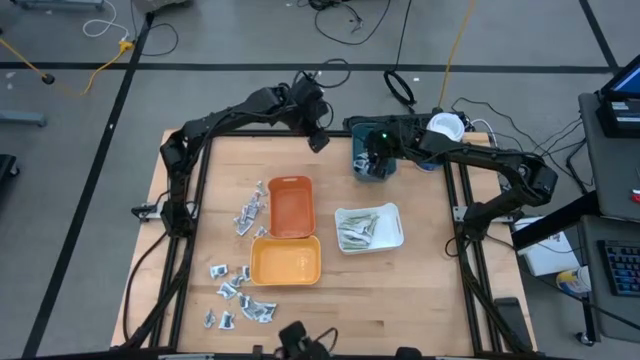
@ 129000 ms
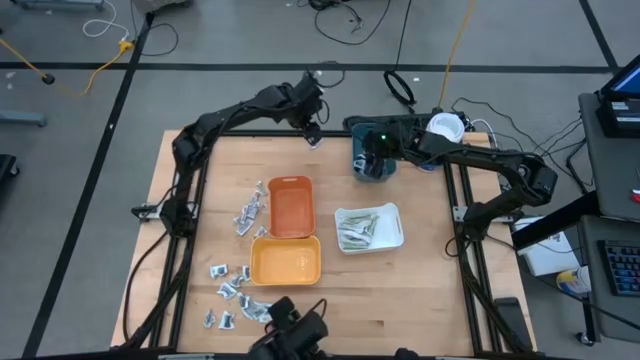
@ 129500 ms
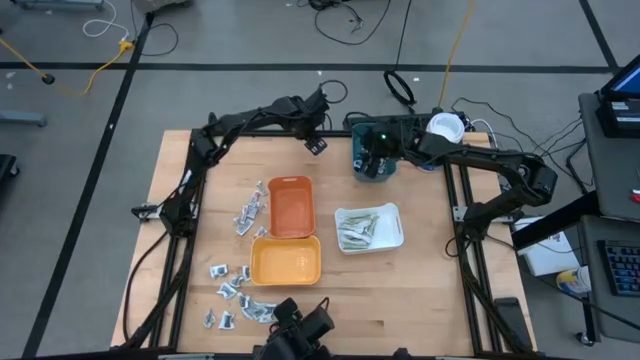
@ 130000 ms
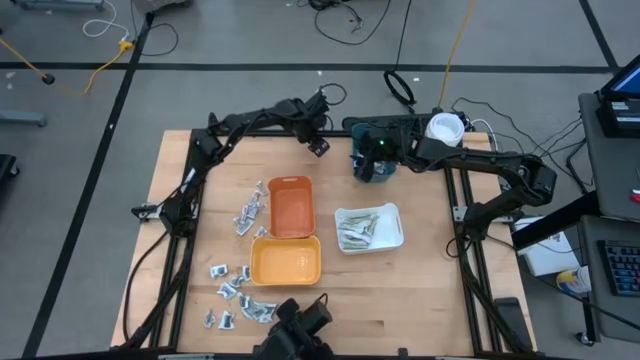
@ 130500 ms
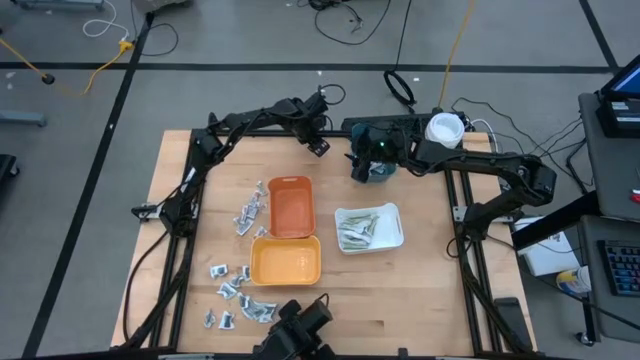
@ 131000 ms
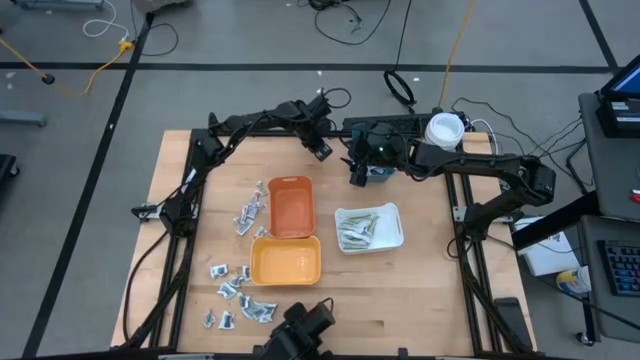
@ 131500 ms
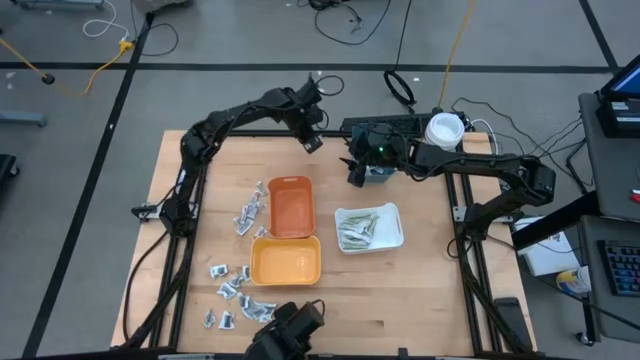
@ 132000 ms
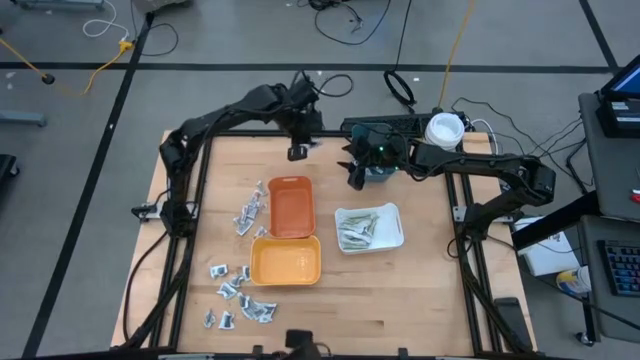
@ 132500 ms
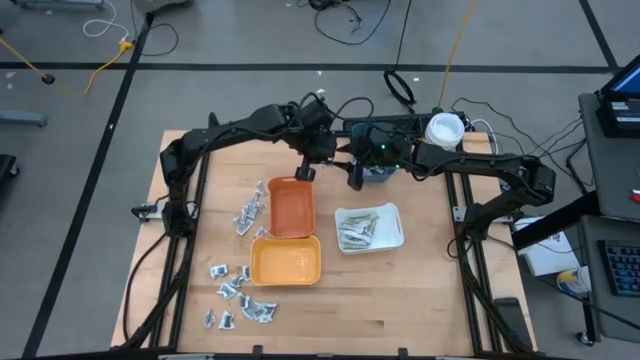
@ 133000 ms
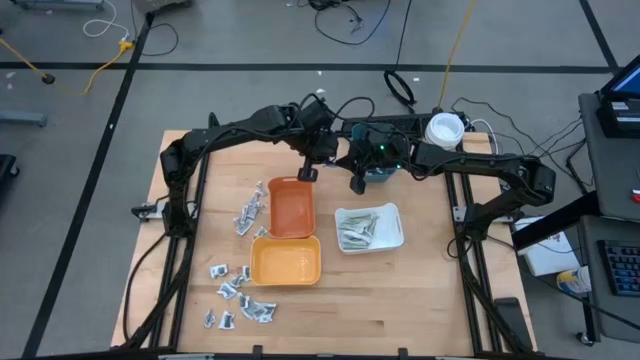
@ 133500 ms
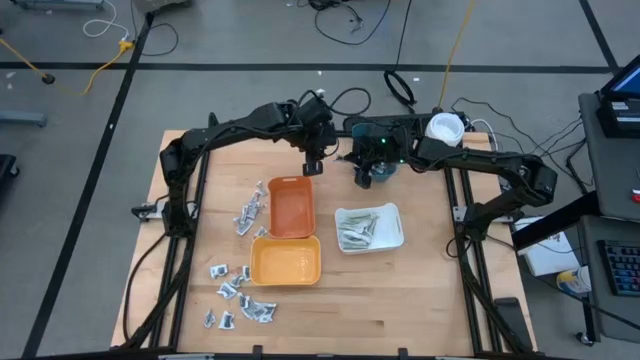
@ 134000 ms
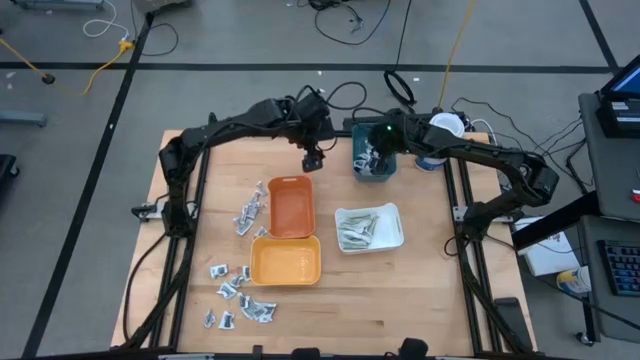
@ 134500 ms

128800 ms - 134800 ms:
Task: Pick & Place First Aid Supplies
Put the blue sachet into the blue bin

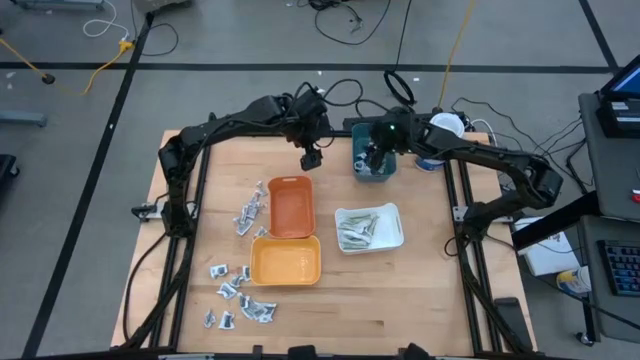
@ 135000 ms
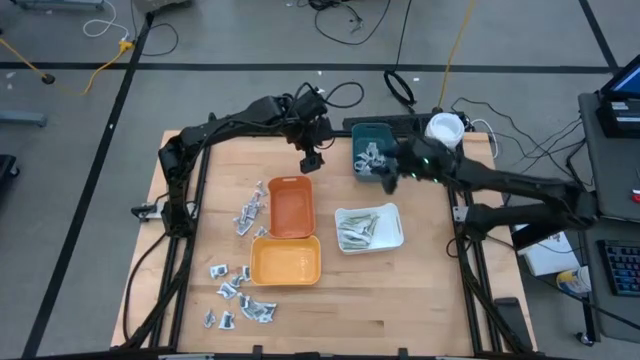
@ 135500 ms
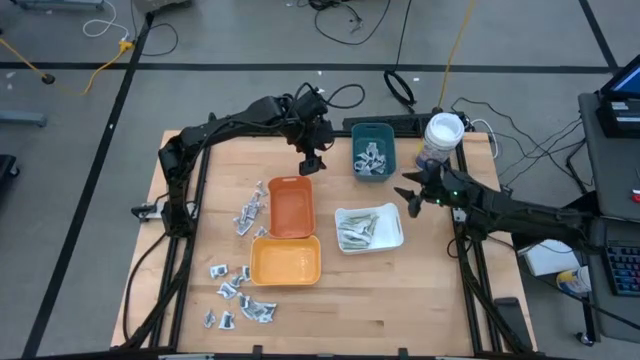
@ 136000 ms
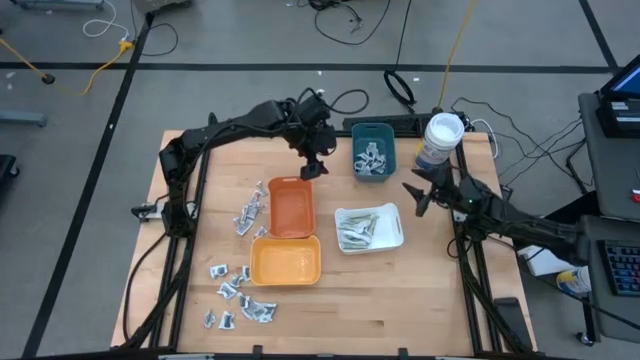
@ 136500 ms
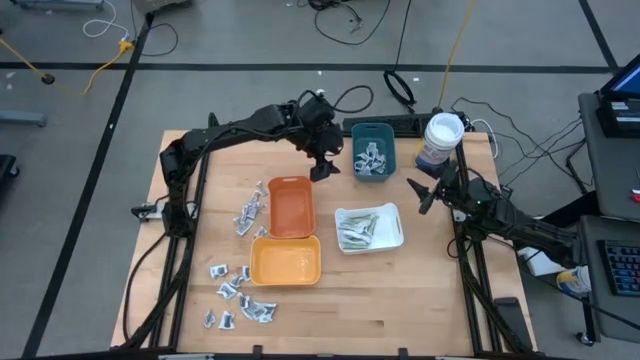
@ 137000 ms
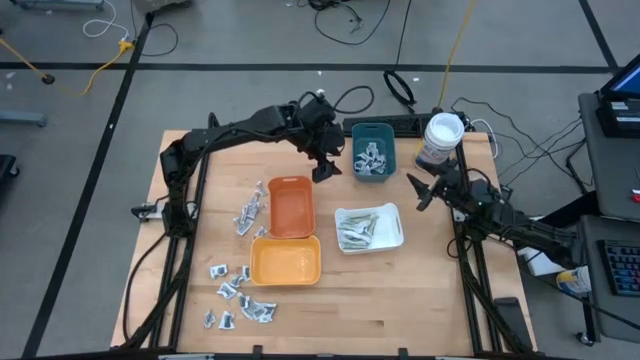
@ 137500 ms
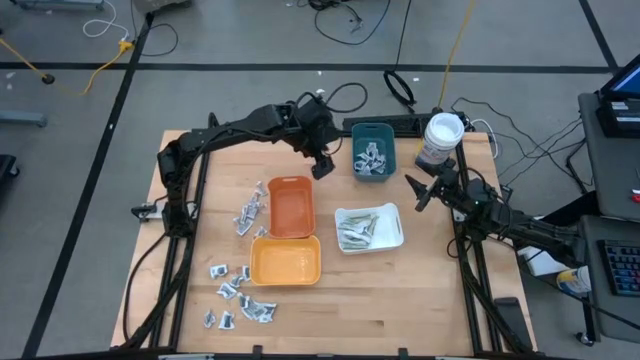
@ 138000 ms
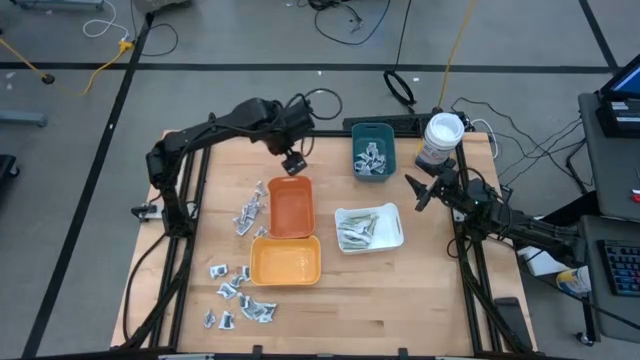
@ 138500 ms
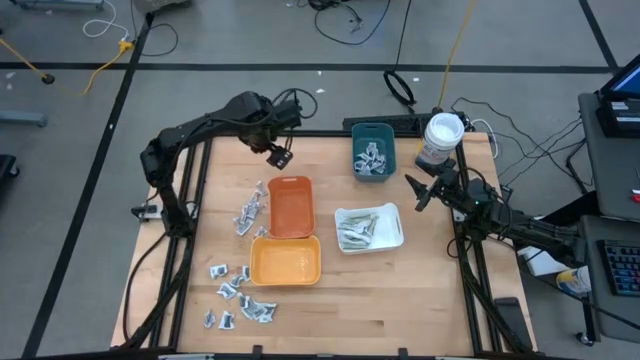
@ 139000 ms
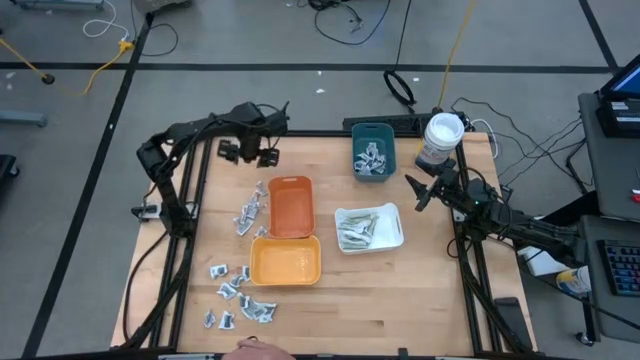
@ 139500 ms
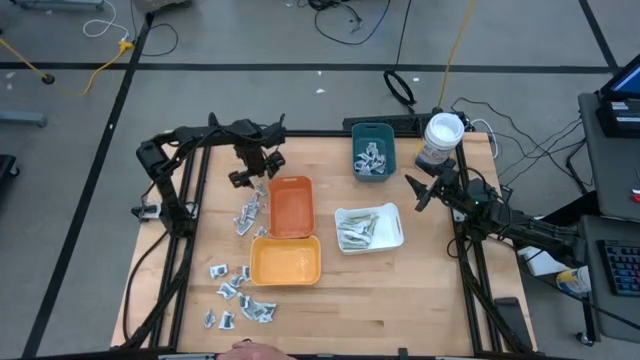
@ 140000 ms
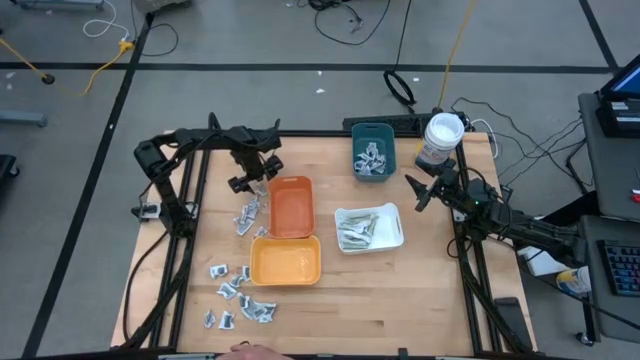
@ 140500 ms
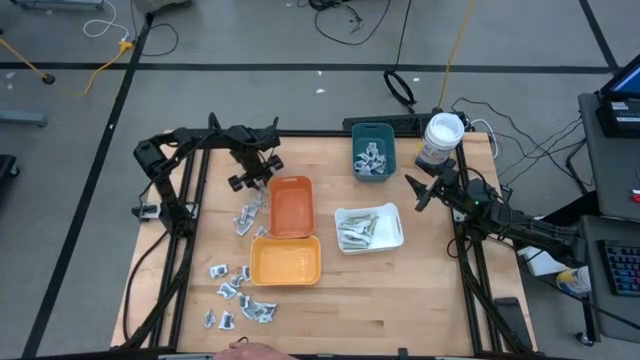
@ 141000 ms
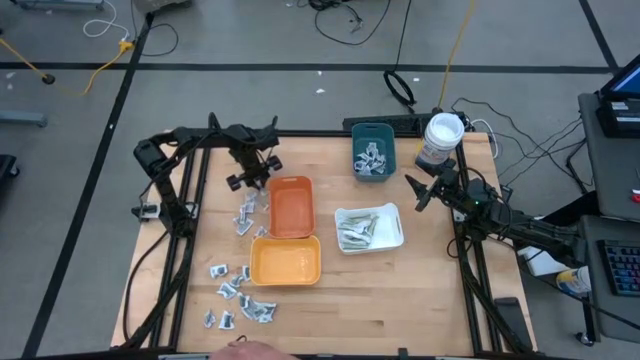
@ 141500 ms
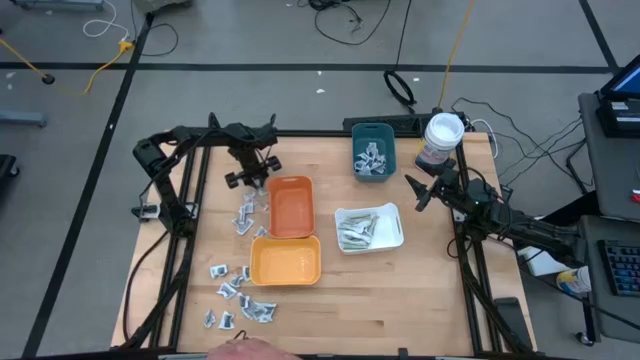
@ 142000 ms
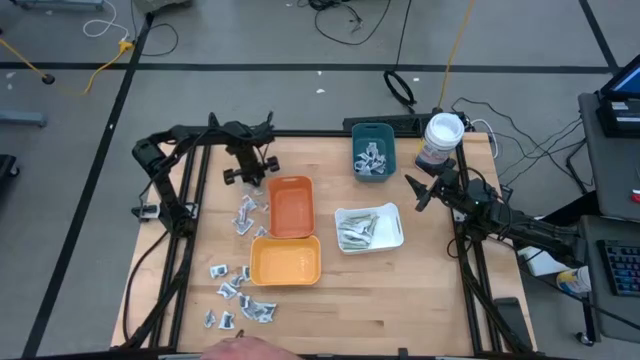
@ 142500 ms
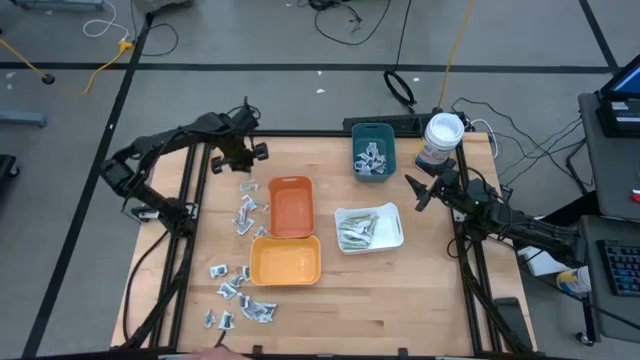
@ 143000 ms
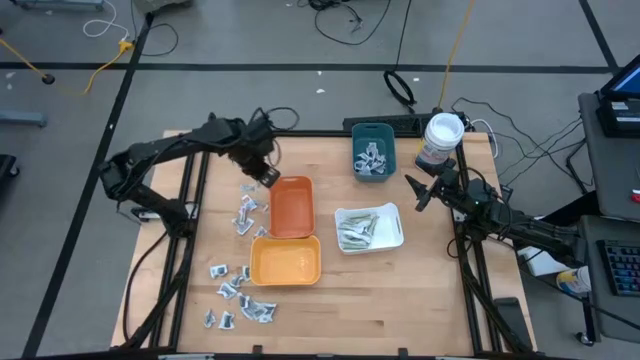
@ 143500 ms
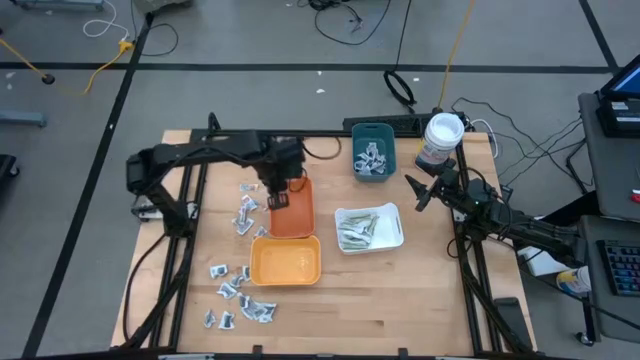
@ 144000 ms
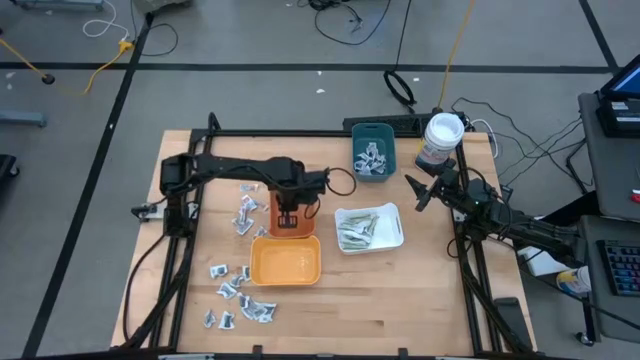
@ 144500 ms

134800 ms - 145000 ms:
Put the orange sachet into the orange bin

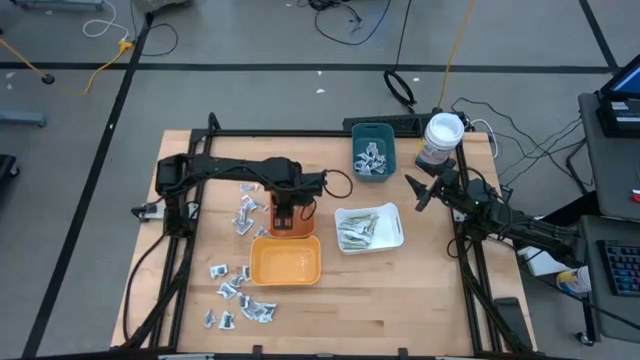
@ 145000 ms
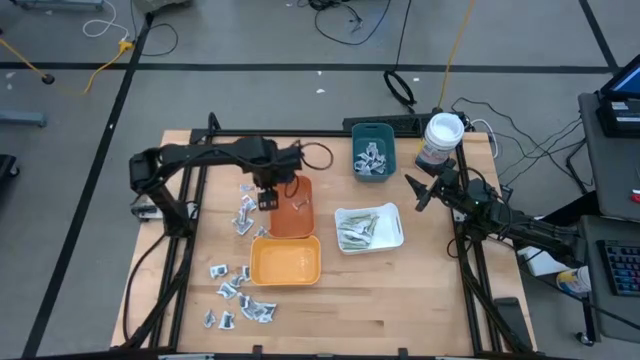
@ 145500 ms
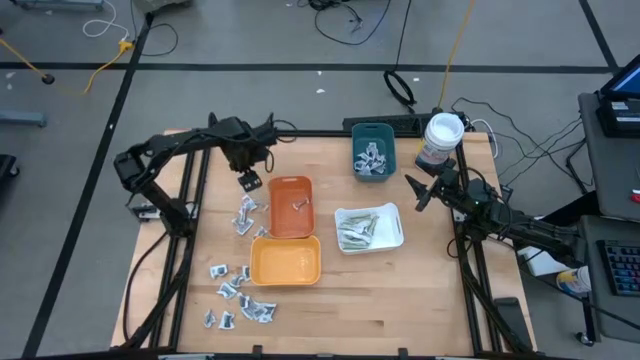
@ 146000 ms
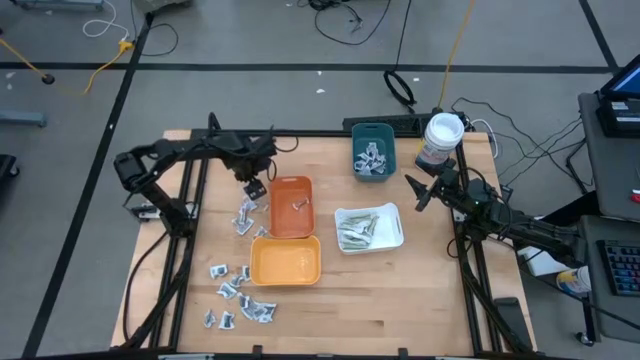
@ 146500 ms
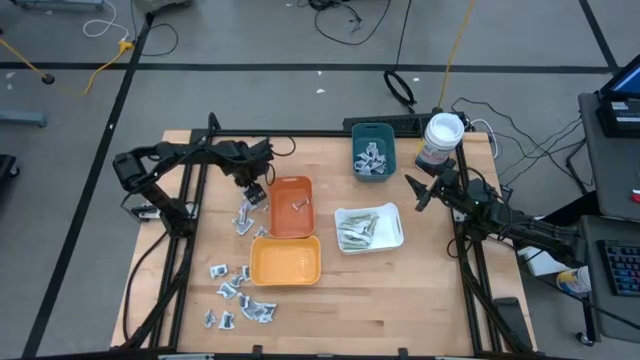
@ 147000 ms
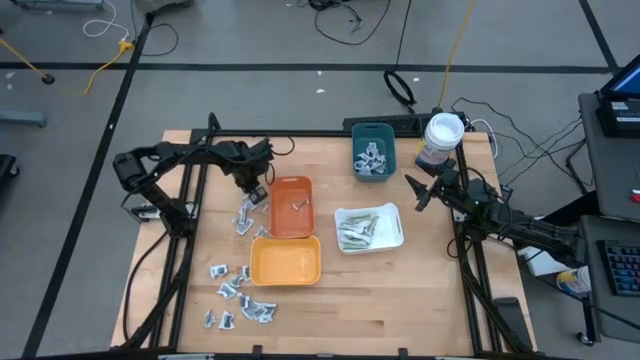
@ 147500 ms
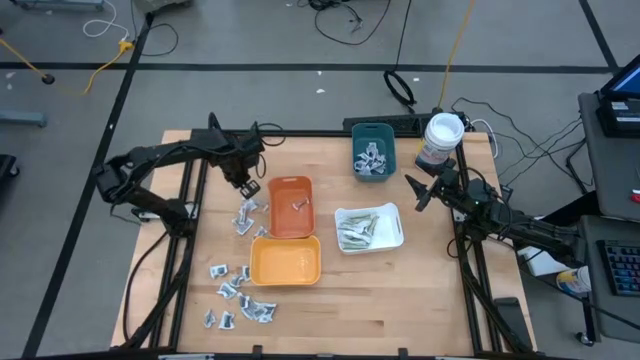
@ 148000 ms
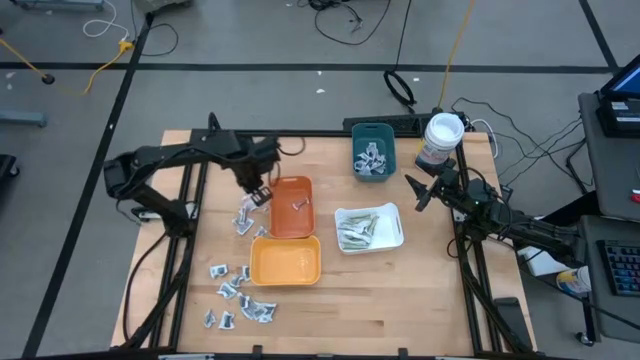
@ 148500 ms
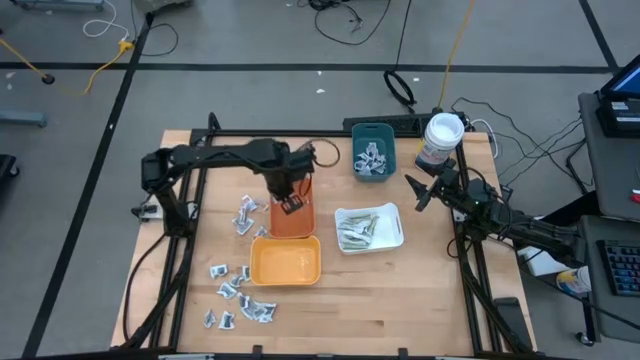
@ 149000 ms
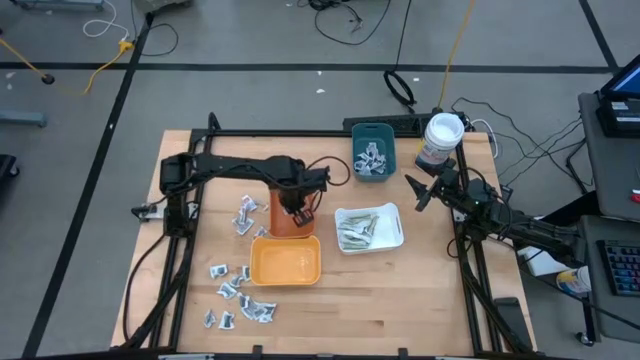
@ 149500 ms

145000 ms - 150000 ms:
Put the orange sachet into the orange bin

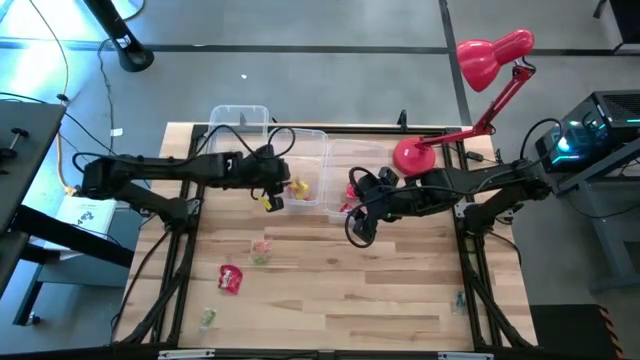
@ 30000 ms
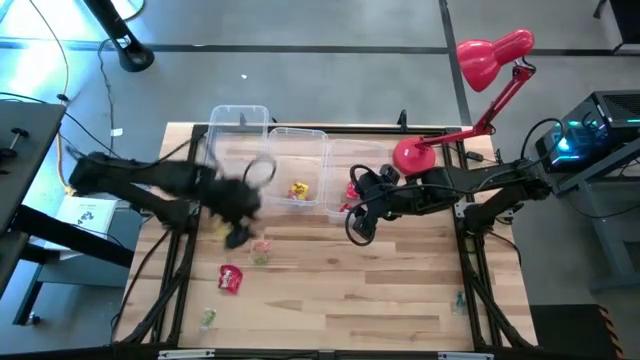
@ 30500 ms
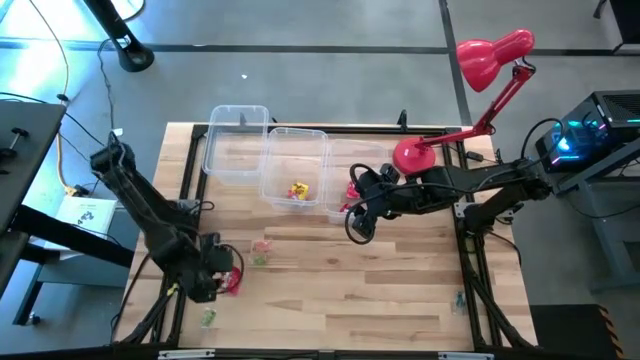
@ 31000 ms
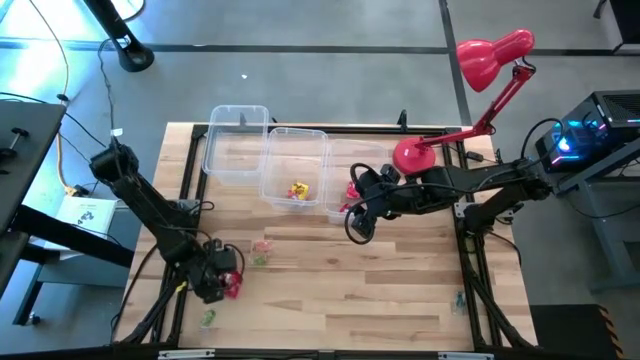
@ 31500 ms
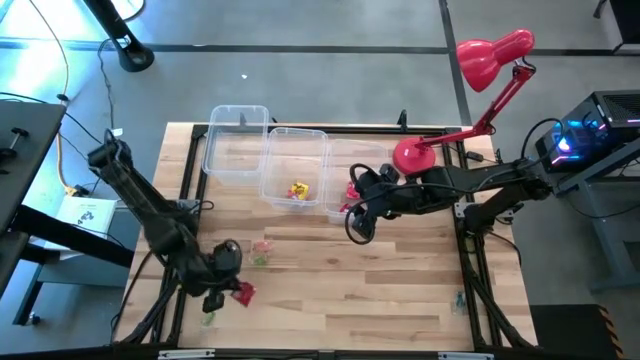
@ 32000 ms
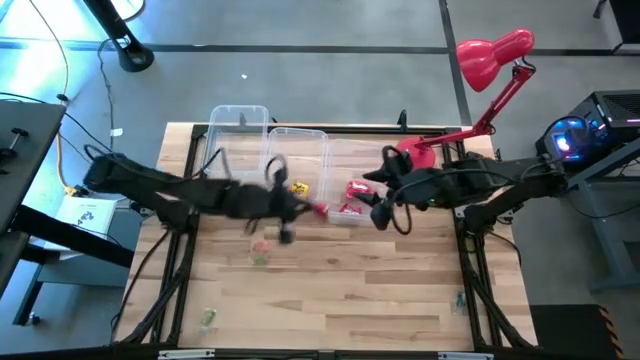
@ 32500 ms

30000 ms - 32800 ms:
Task: Sort candy
Put the red candy pack into right transparent bin
